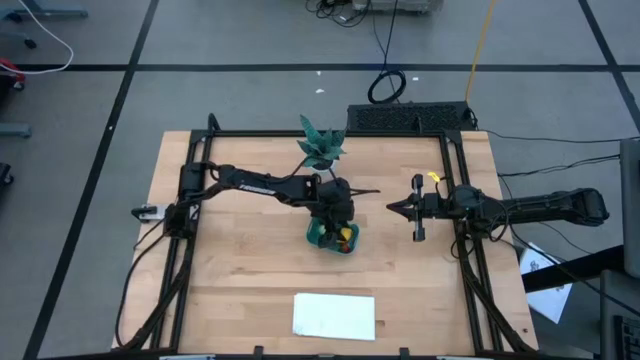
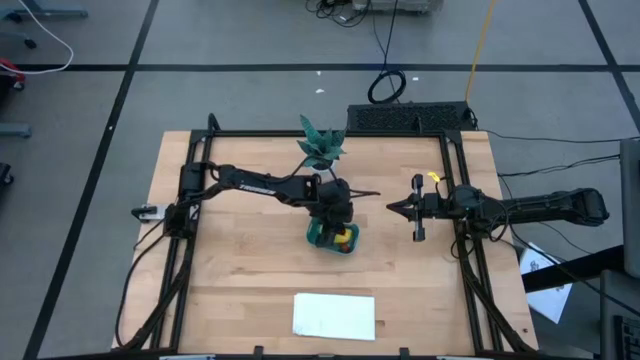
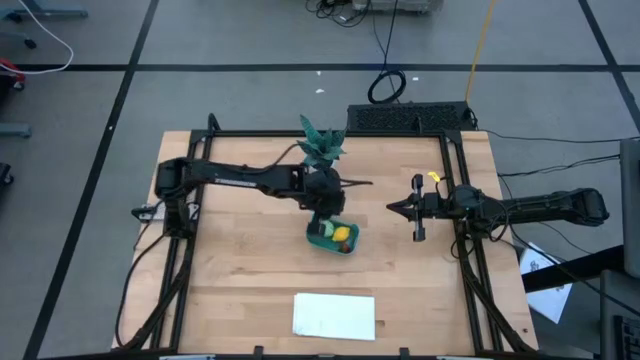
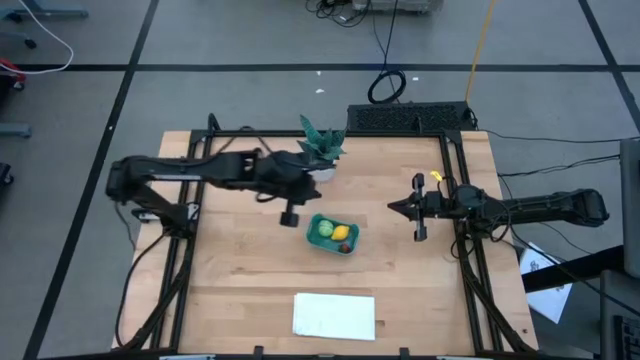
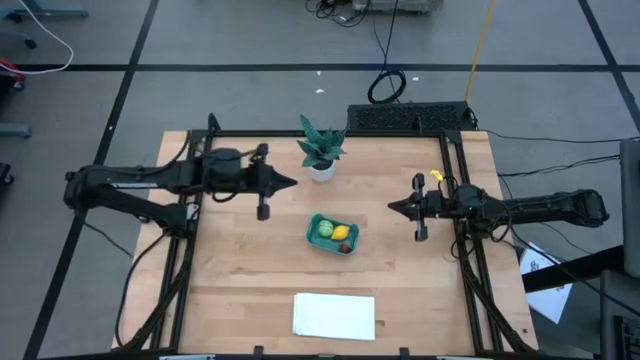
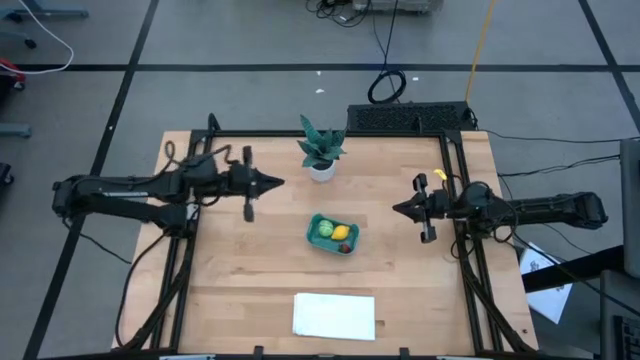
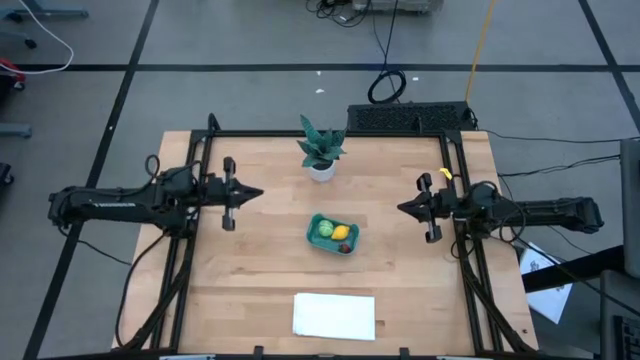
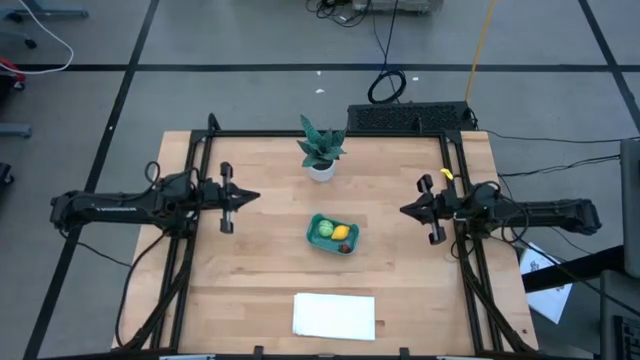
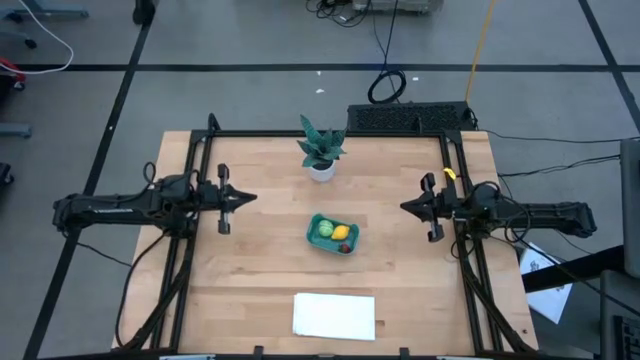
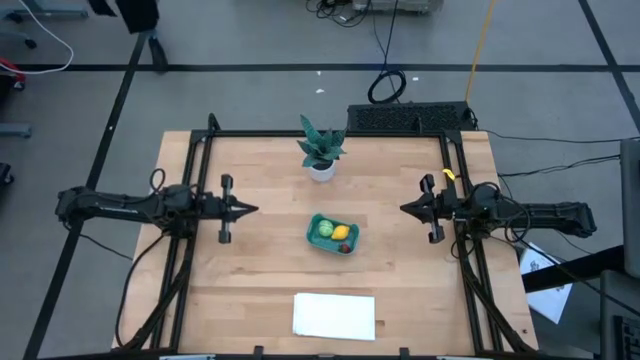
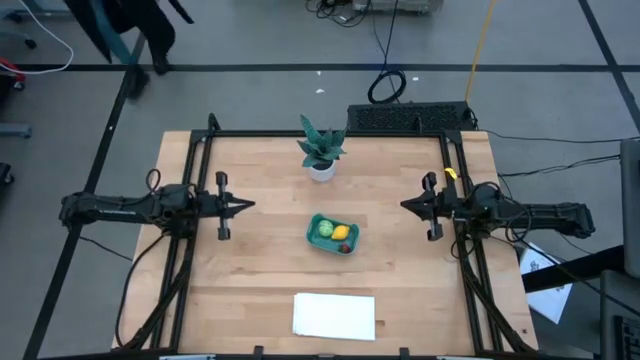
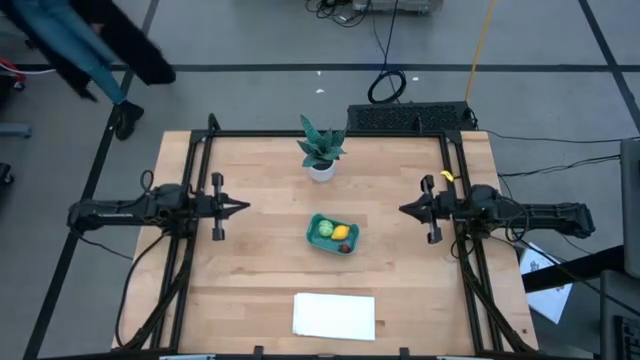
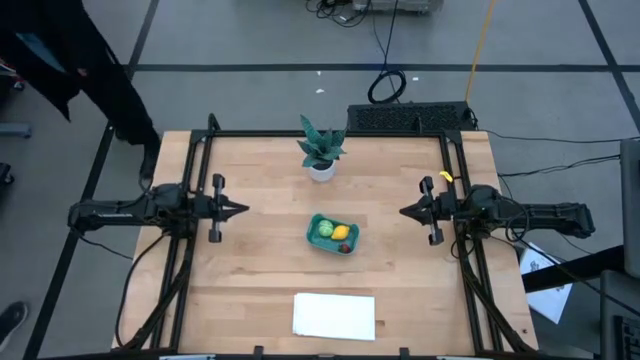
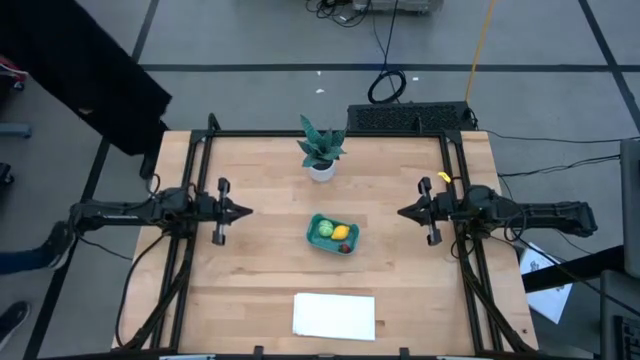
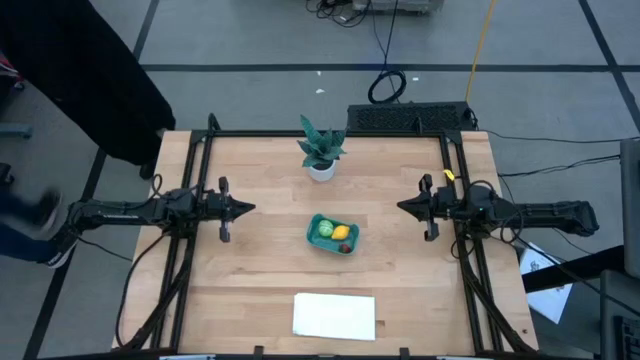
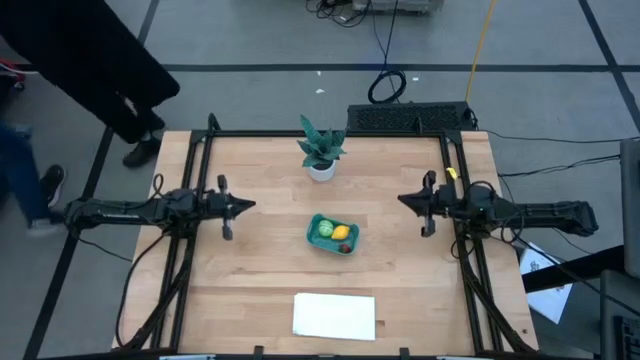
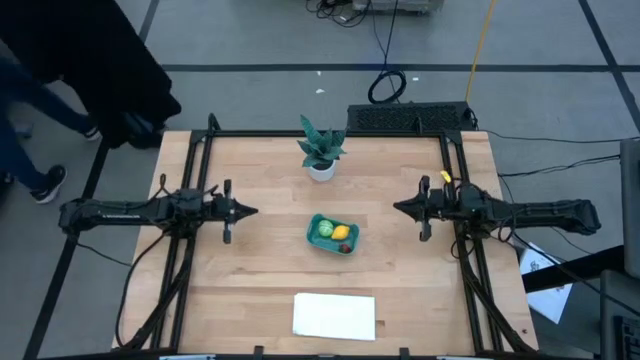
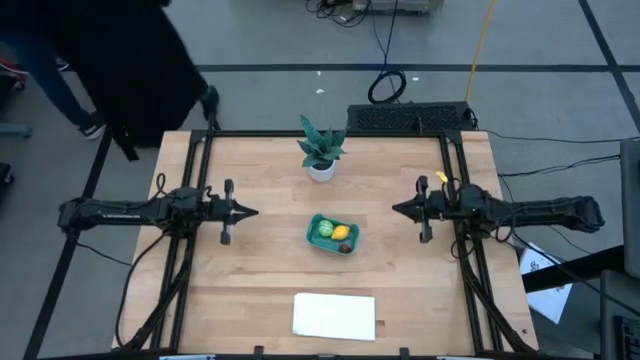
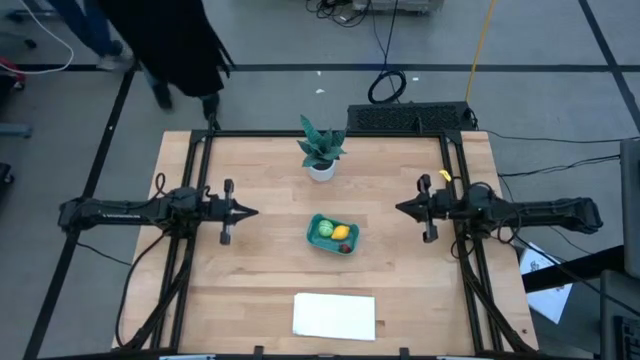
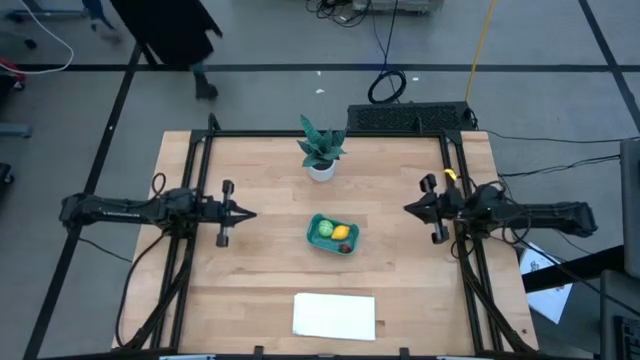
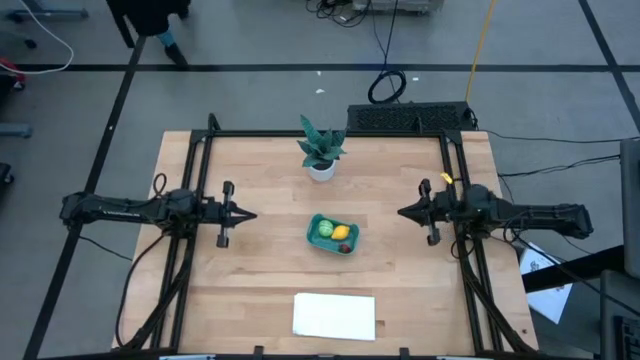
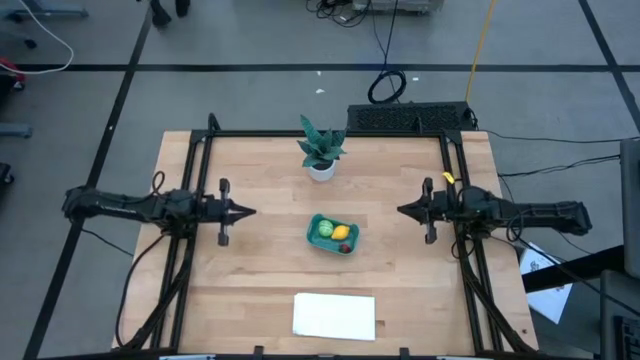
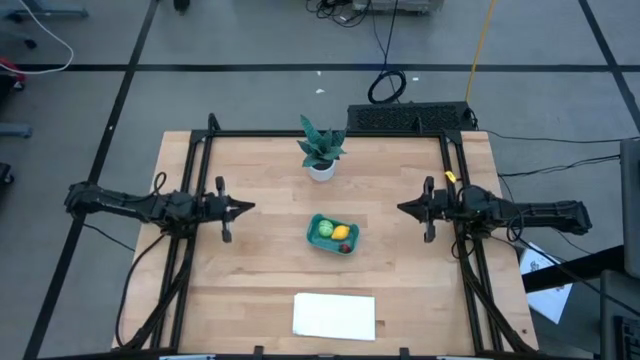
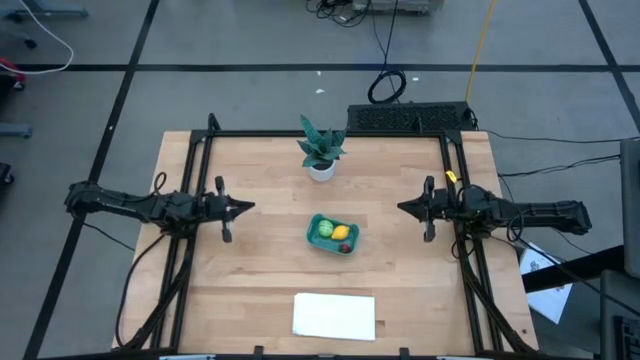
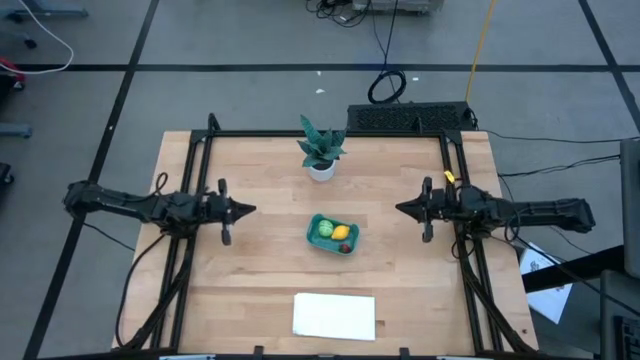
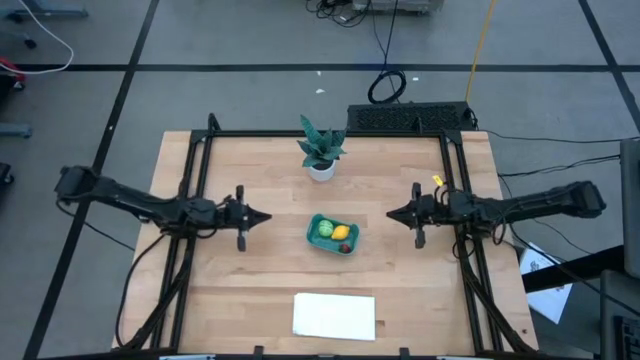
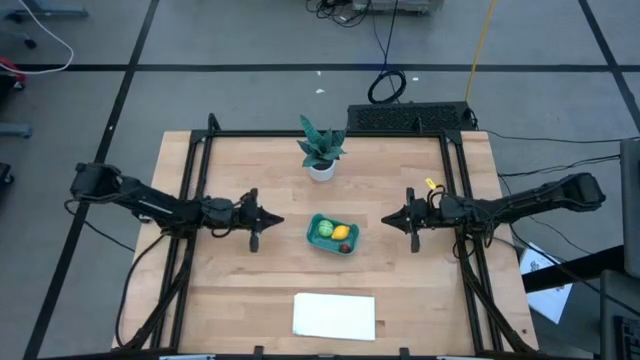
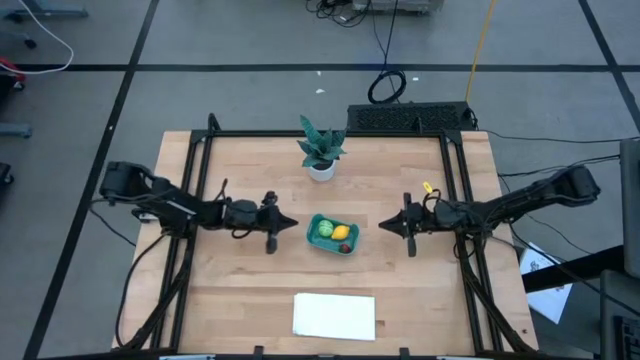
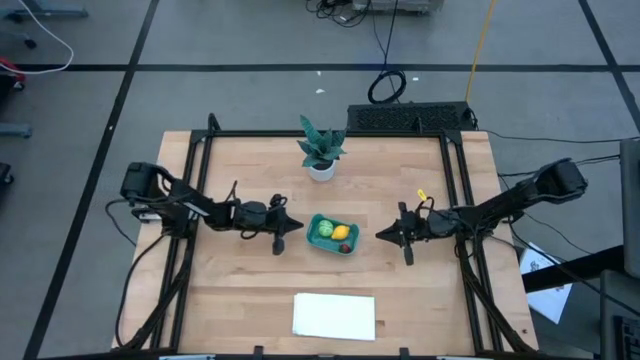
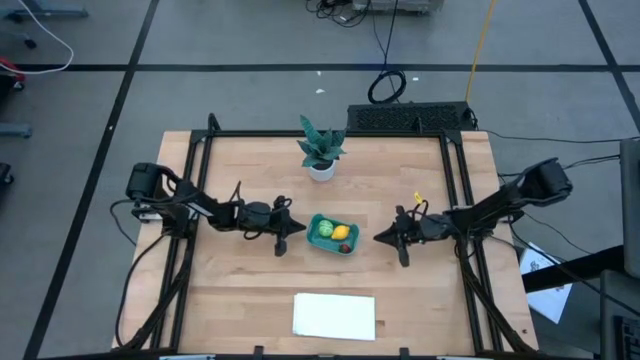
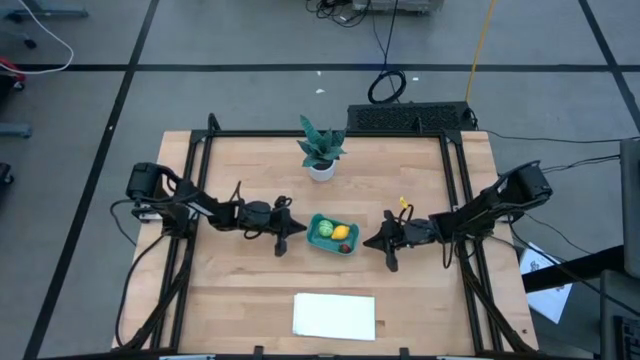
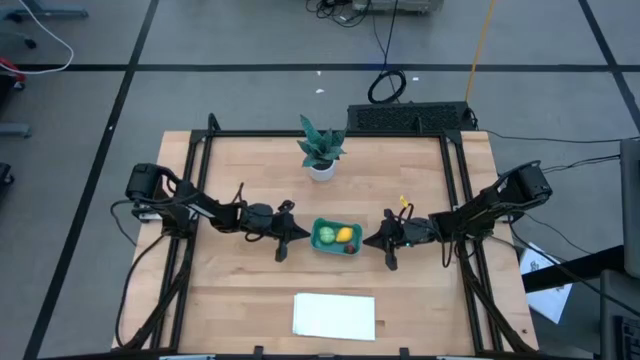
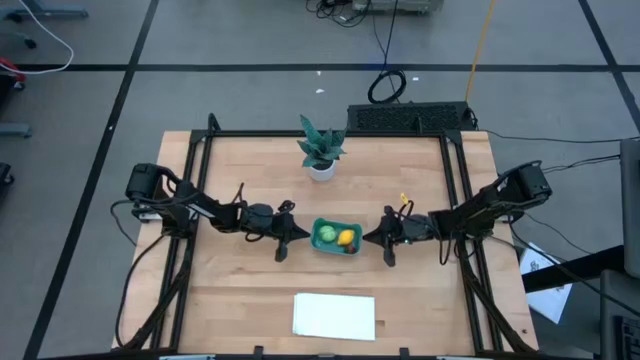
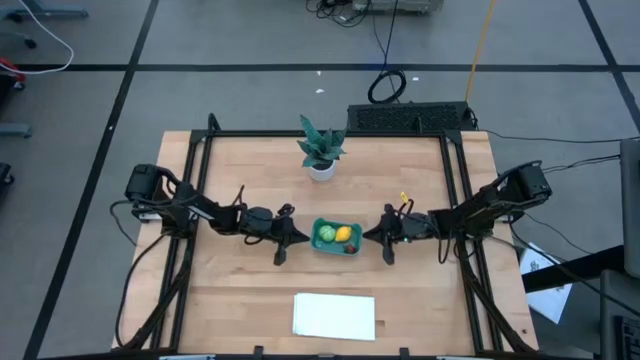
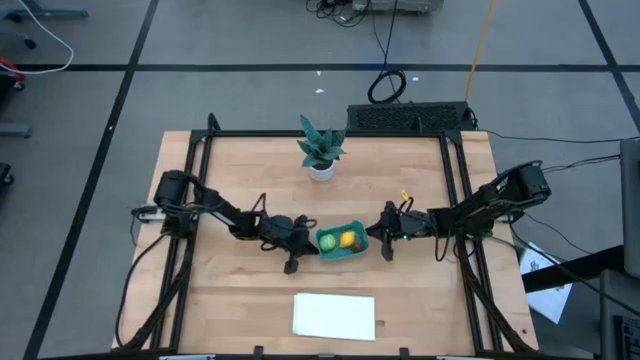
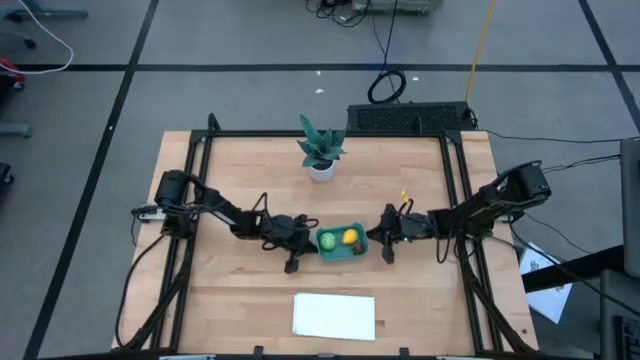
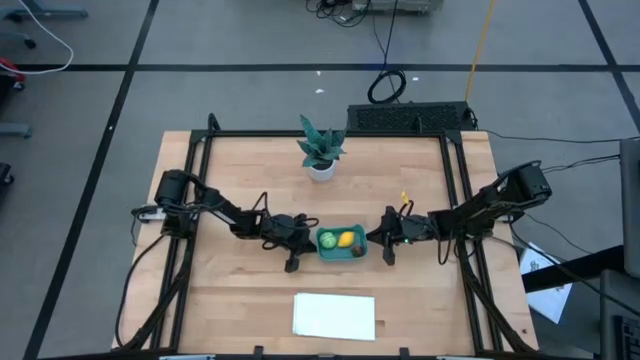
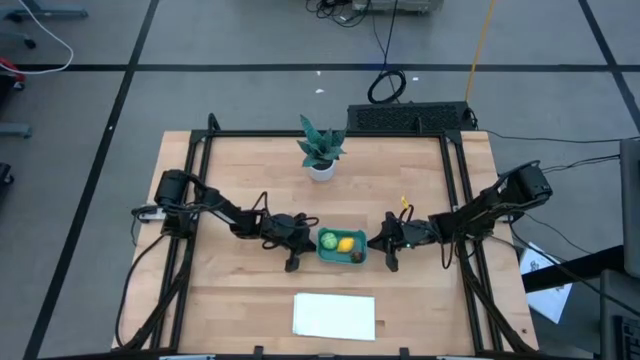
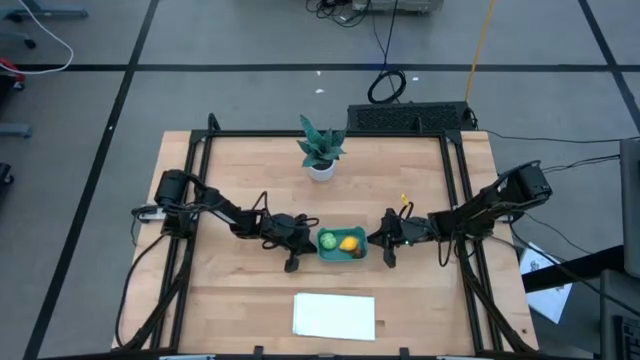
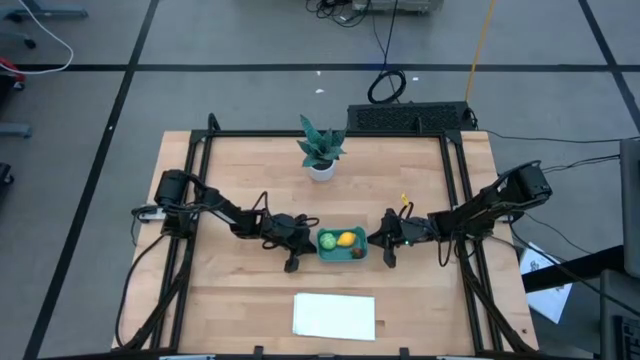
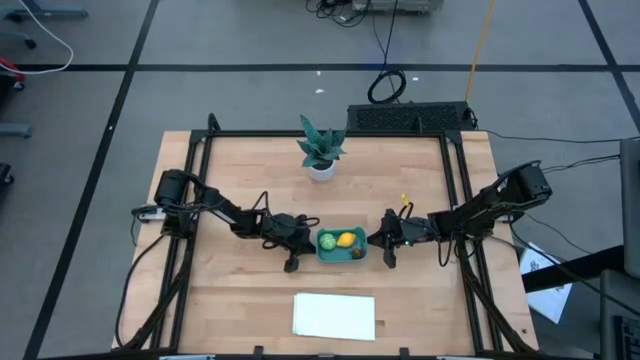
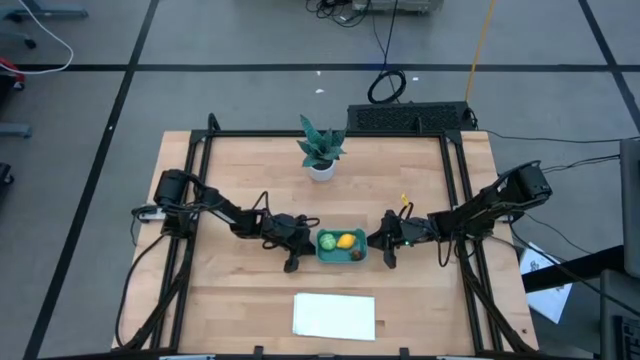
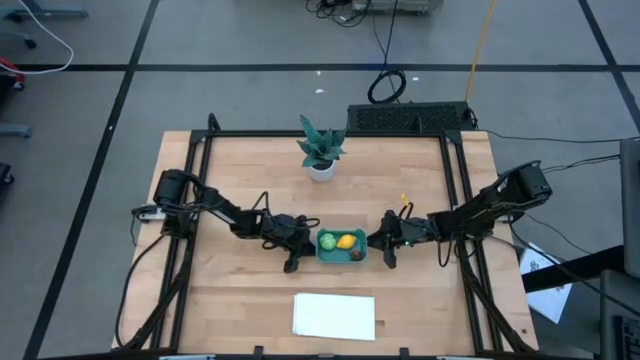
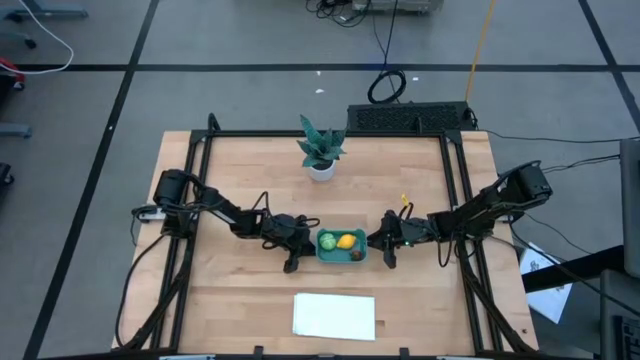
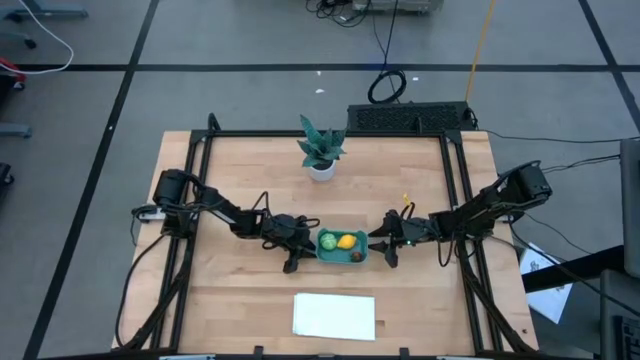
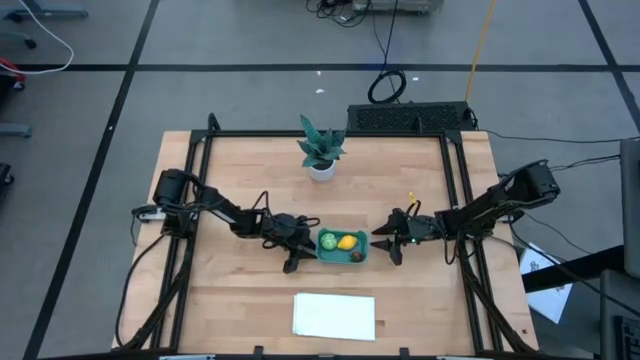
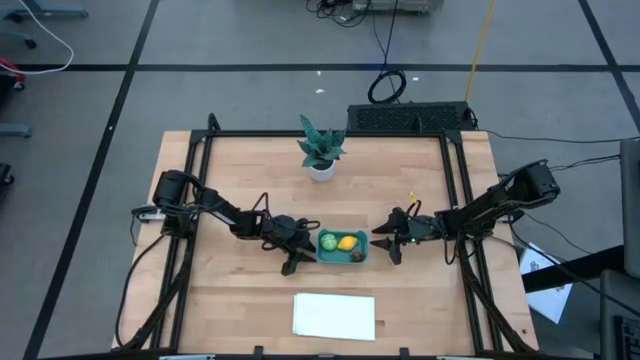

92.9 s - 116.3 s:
Task: Pick and placing Produce into tupperware
Adjust the green bin on the table
